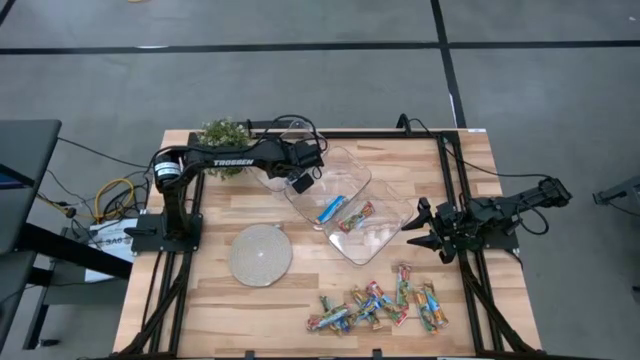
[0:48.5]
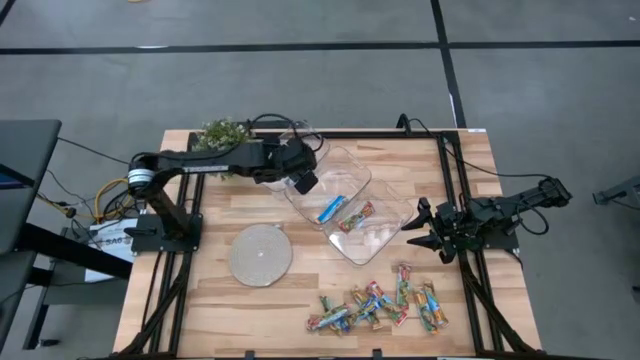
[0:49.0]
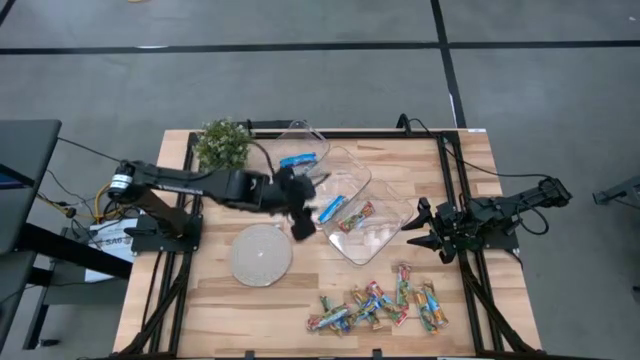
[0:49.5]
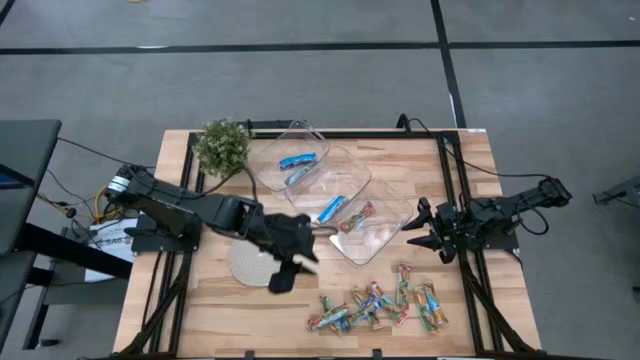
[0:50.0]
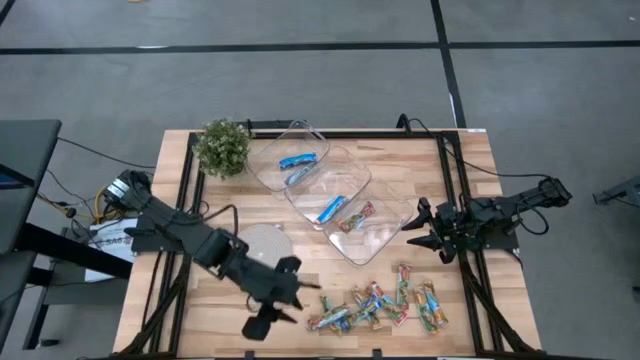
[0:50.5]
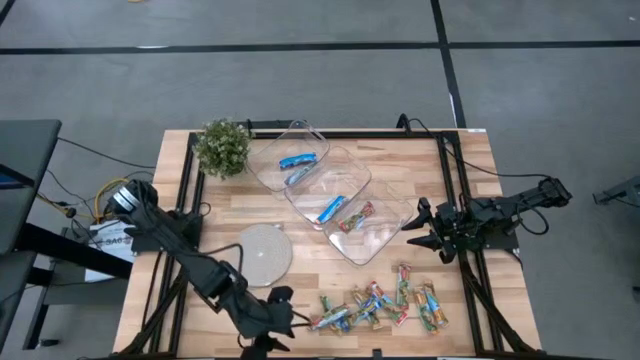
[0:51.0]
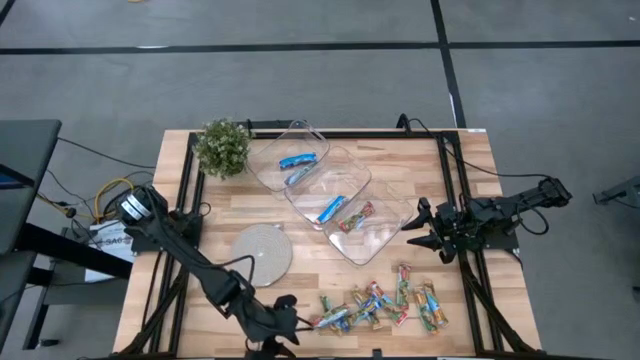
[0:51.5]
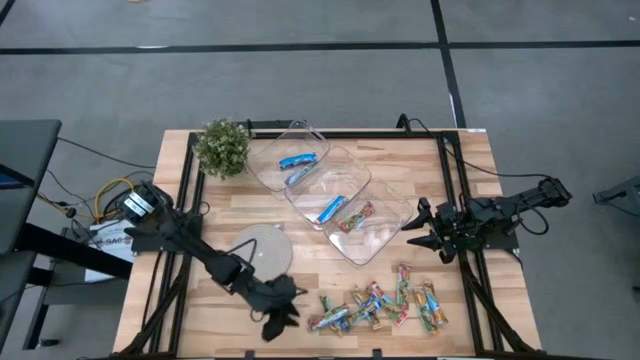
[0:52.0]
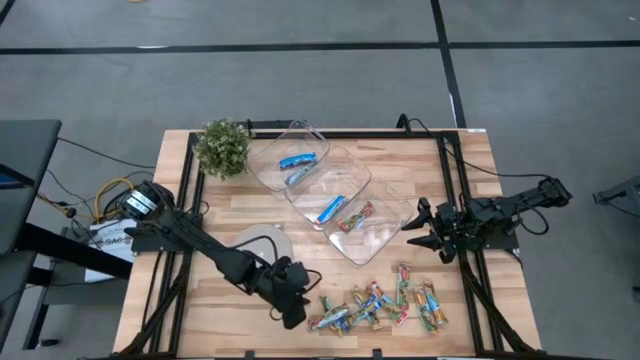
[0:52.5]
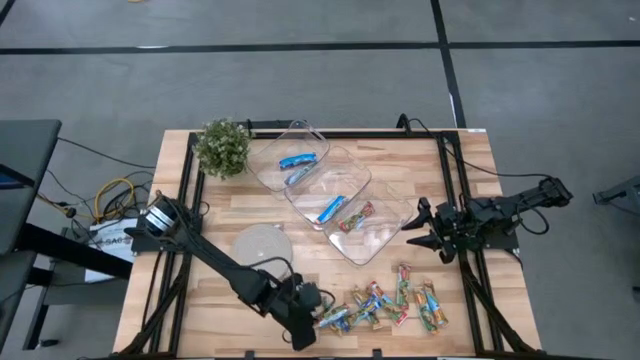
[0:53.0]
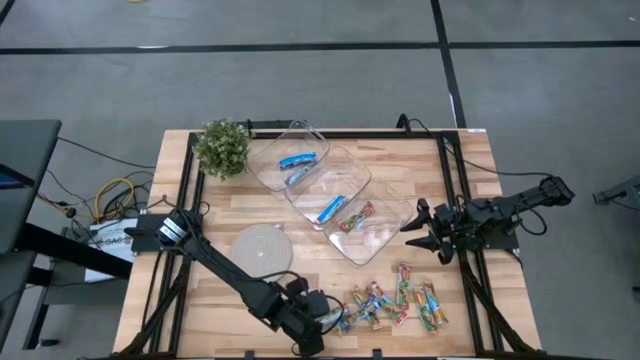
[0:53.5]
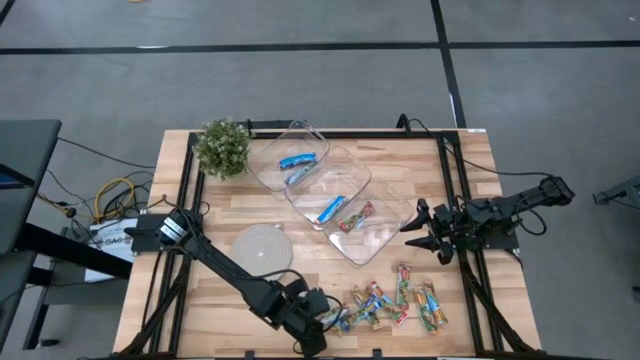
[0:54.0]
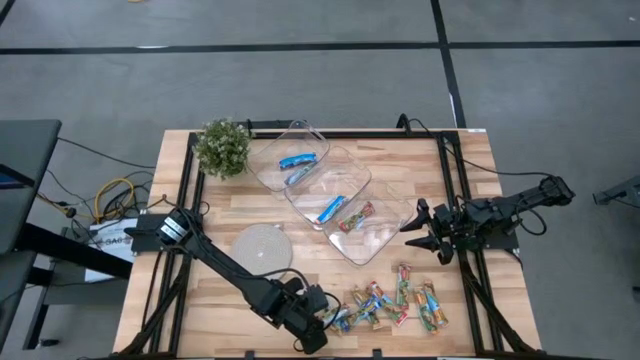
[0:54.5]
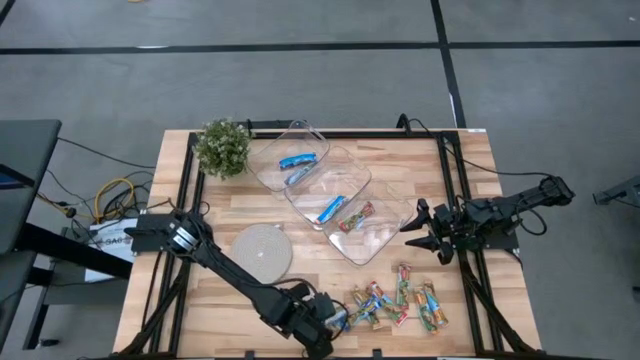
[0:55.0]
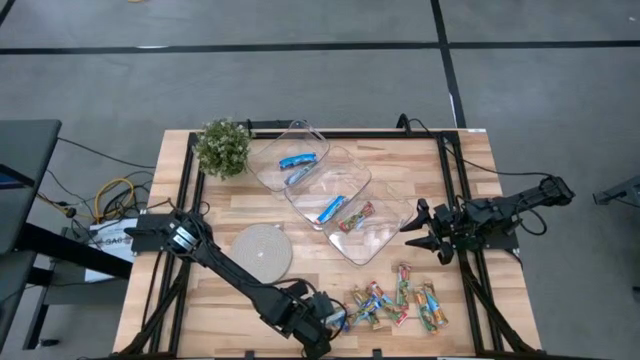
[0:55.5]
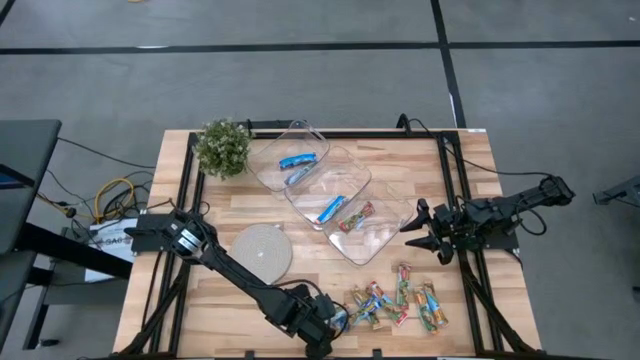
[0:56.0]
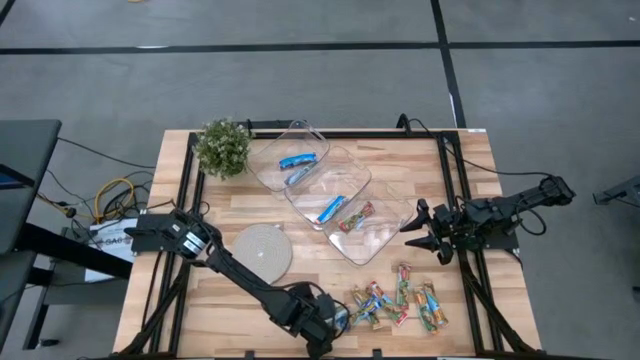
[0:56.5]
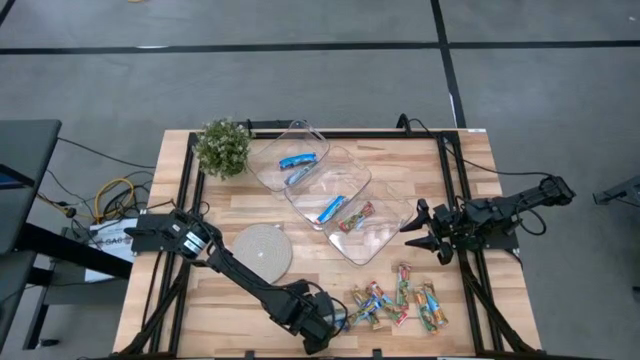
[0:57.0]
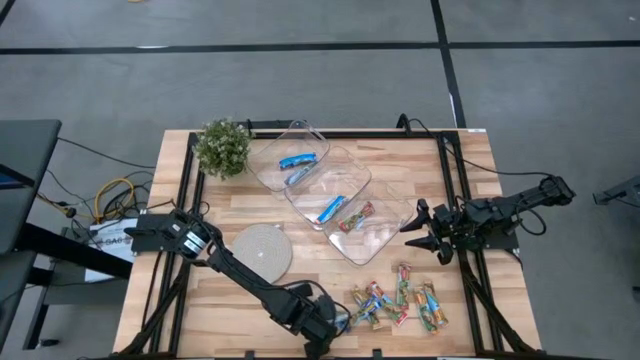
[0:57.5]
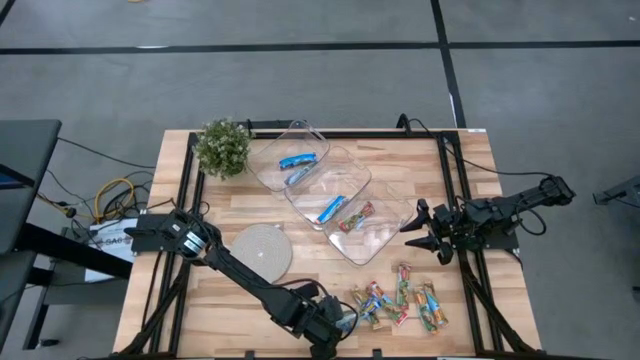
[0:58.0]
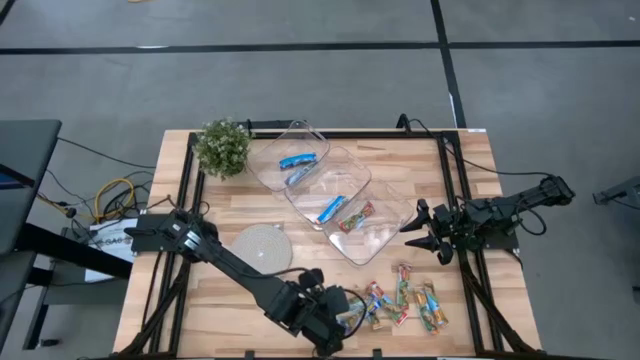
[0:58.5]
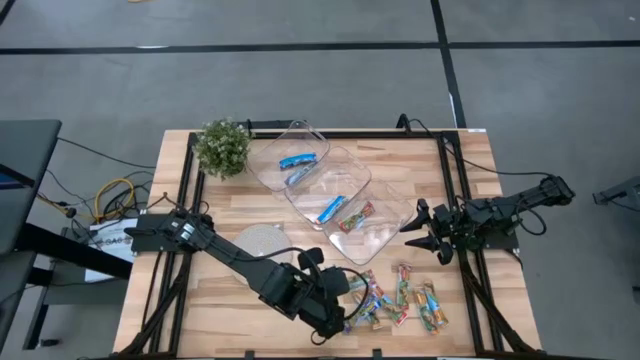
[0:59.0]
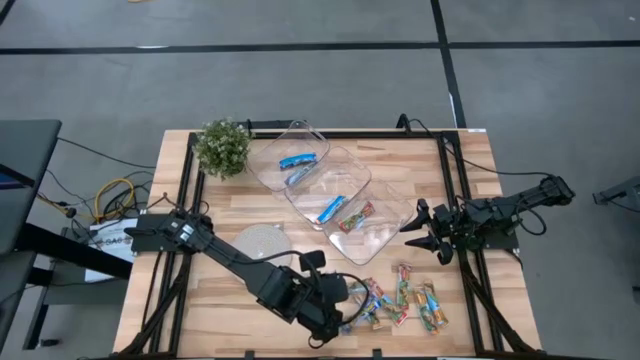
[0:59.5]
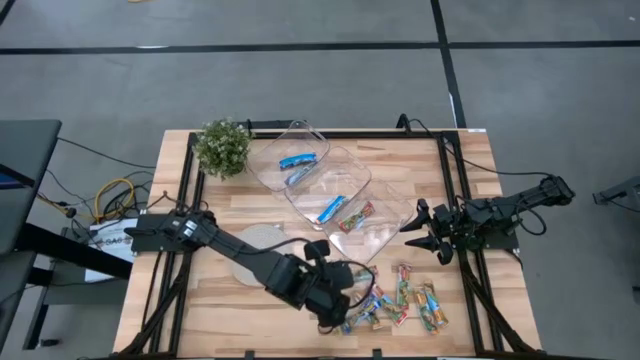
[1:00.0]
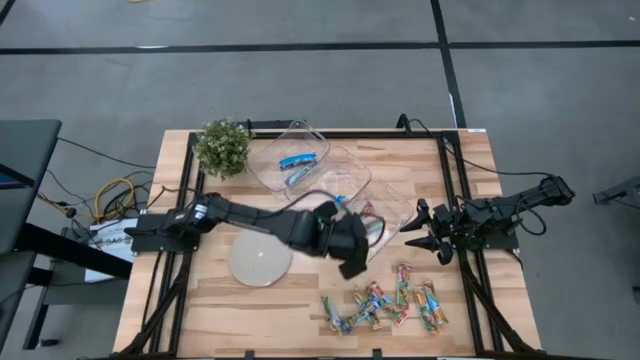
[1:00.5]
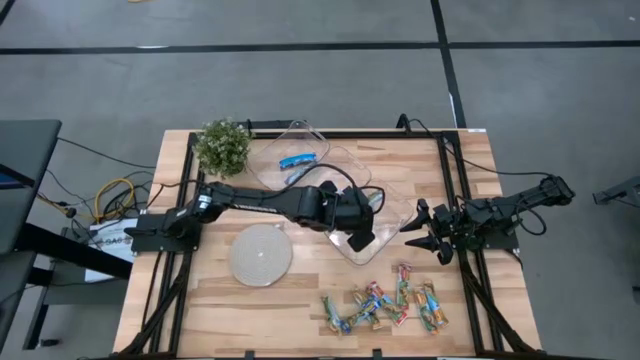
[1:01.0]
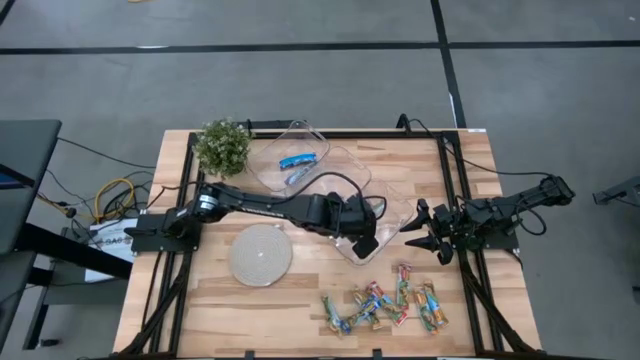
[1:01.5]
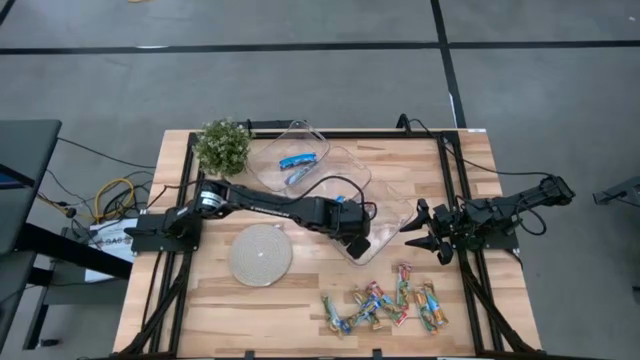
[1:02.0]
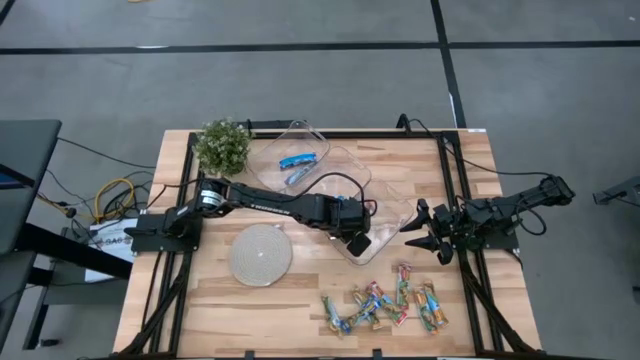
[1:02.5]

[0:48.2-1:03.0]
Task: Pick and place Granola Bars by type
Put the red granola bar into the bottom transparent bin

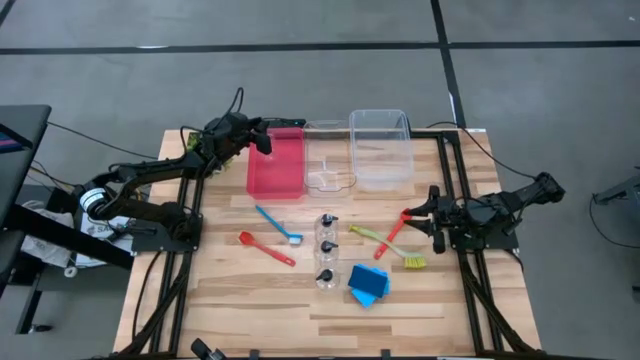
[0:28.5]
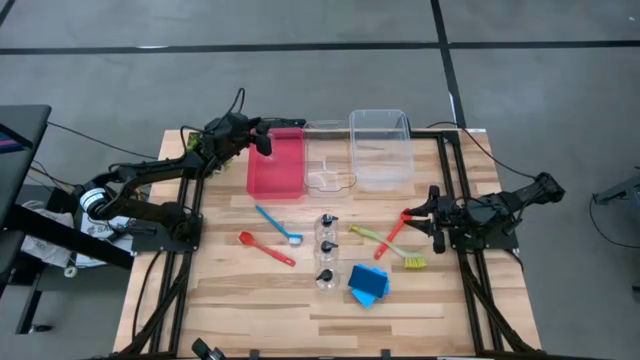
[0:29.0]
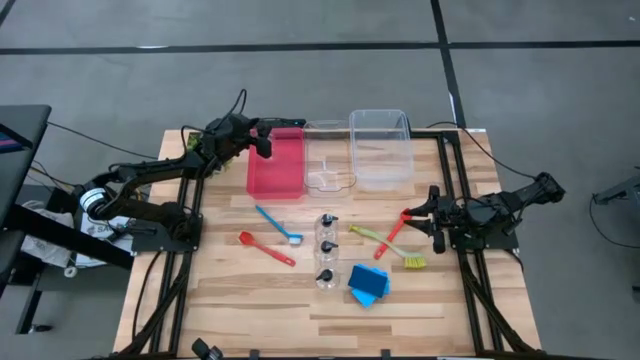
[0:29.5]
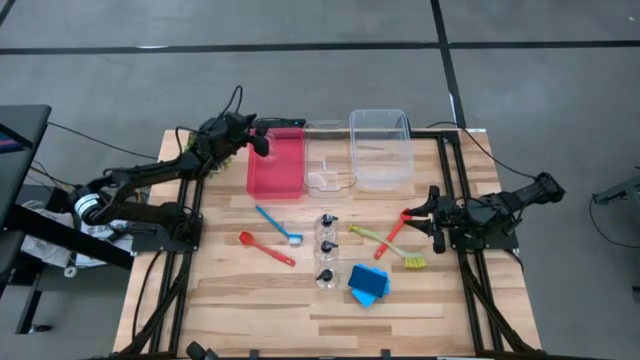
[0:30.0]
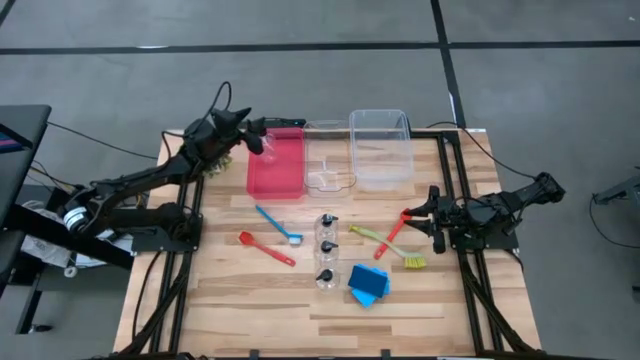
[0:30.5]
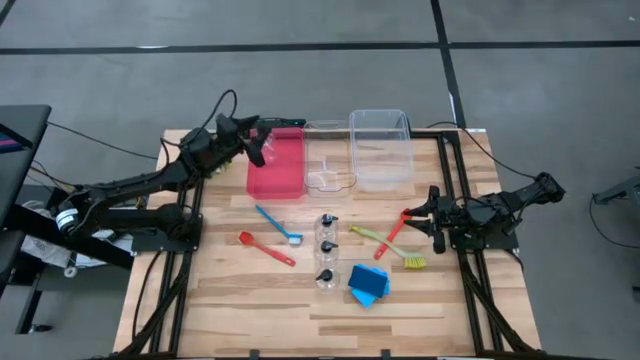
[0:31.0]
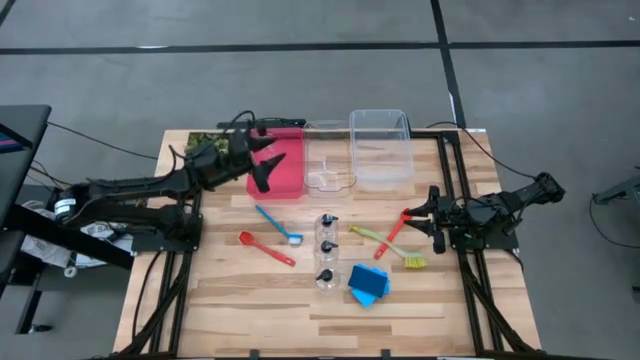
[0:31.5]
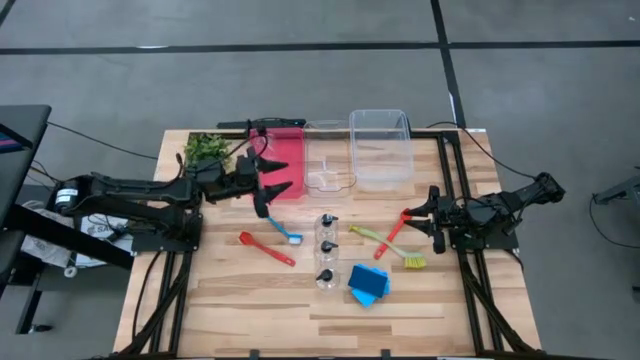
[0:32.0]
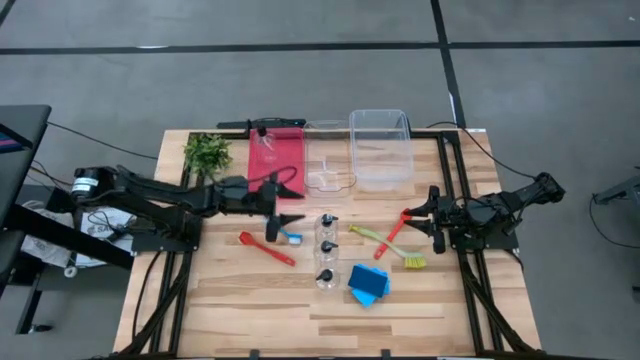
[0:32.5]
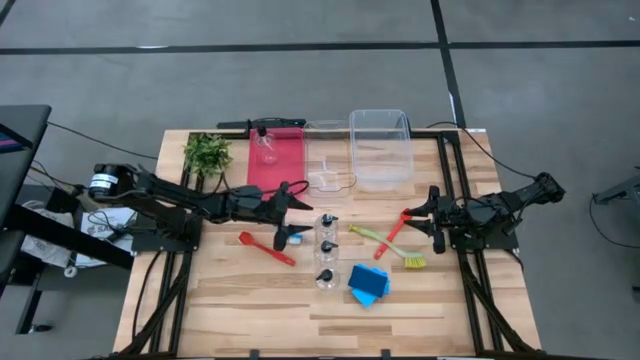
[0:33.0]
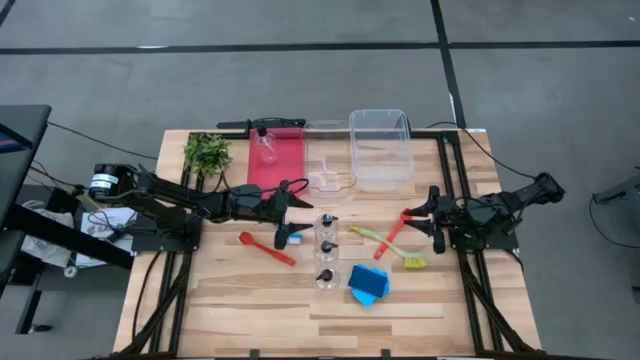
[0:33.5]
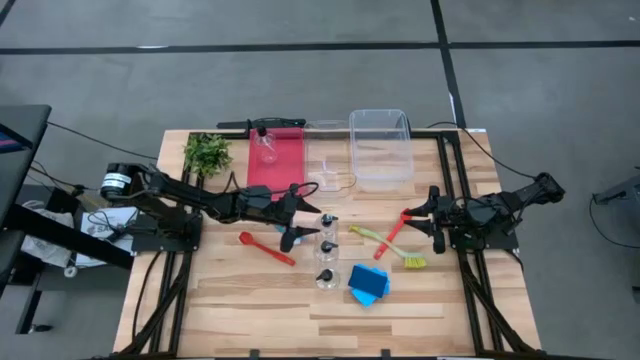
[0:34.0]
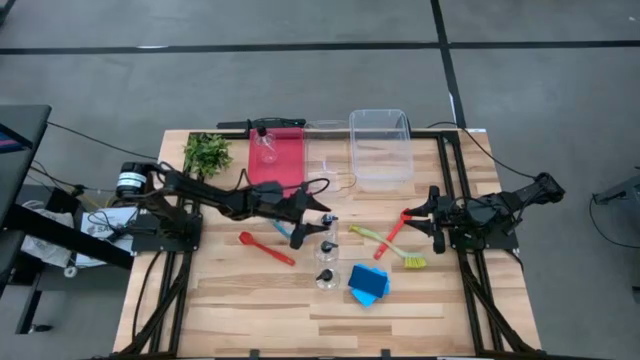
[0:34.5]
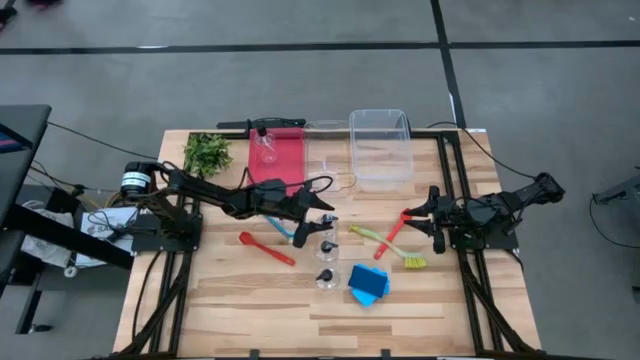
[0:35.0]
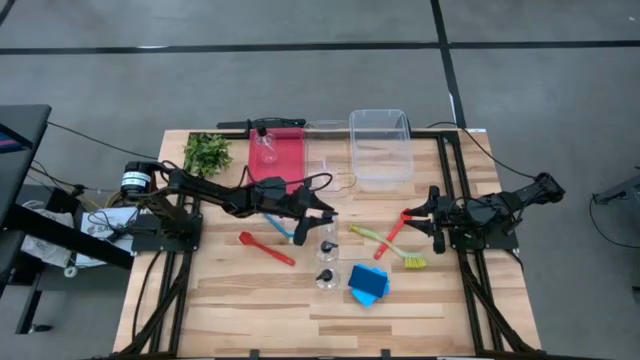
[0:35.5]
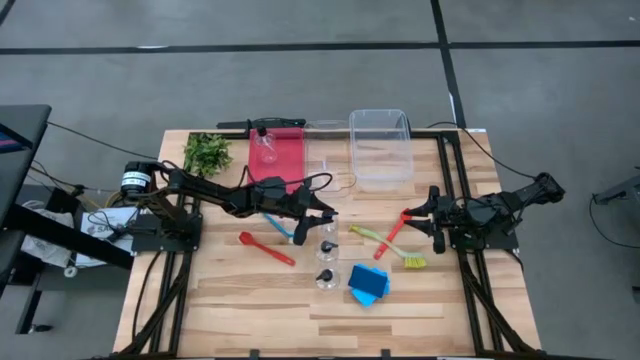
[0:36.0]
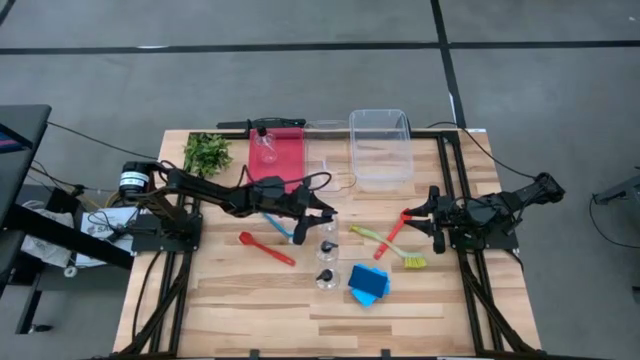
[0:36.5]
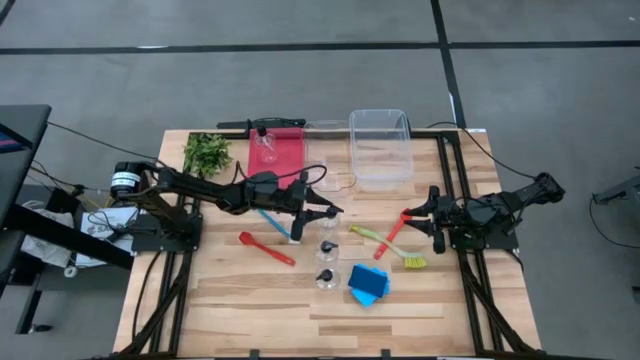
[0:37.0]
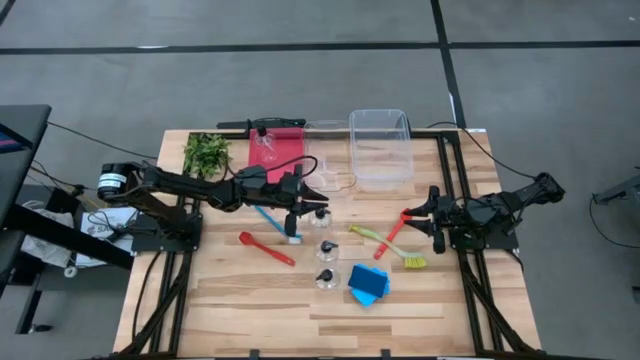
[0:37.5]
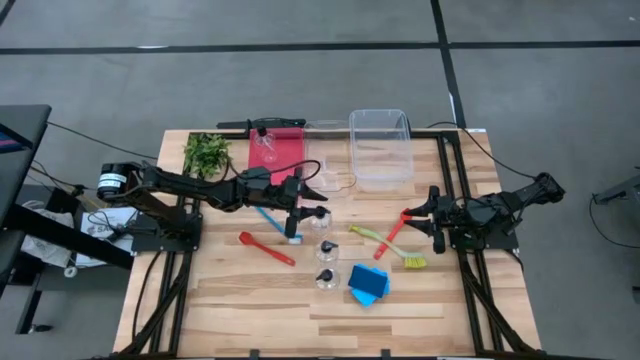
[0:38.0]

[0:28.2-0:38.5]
Task: Pick & Place Kitchen Sink Supplies
Put the spray bottle into the pink bin
